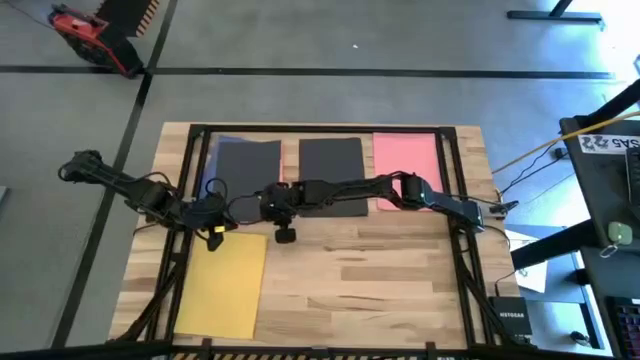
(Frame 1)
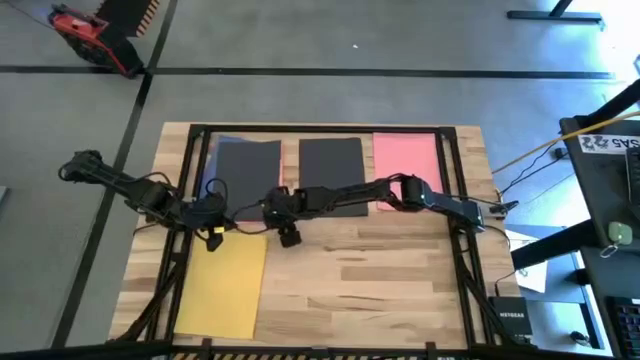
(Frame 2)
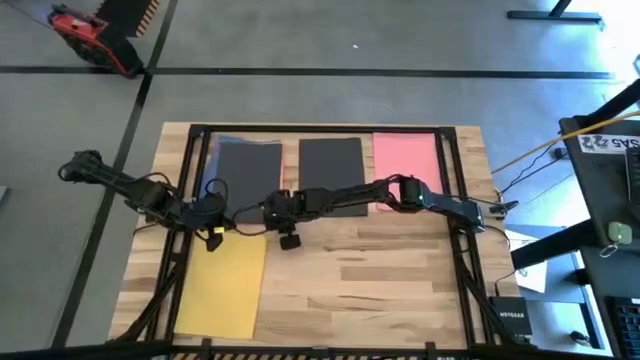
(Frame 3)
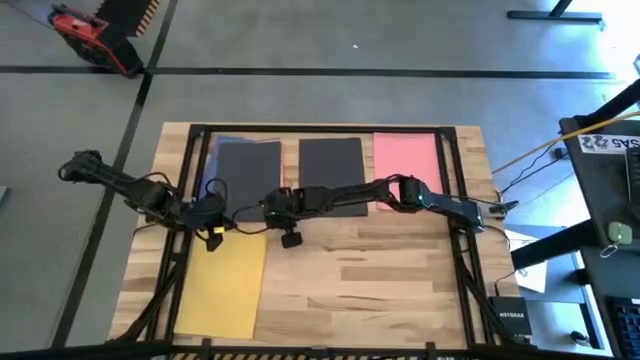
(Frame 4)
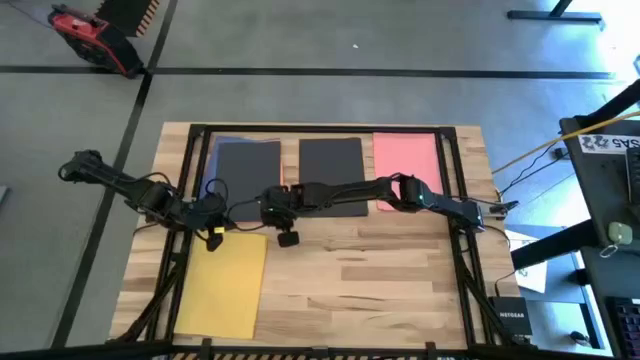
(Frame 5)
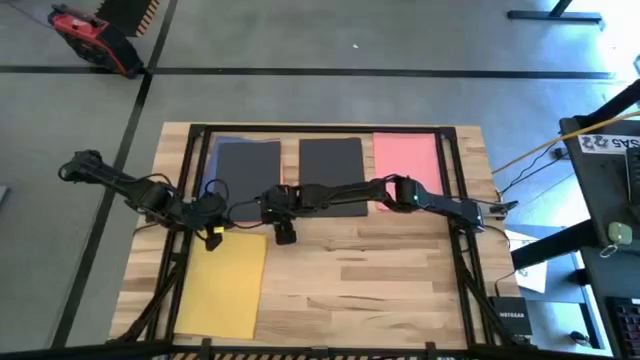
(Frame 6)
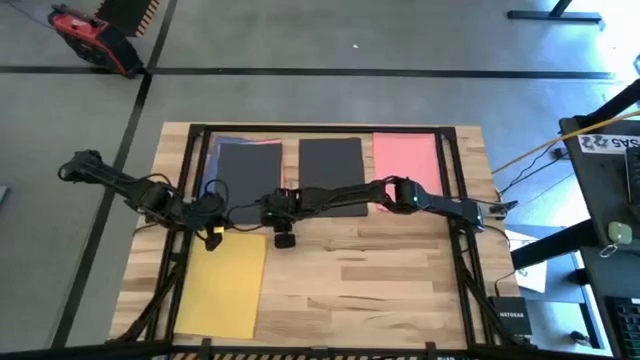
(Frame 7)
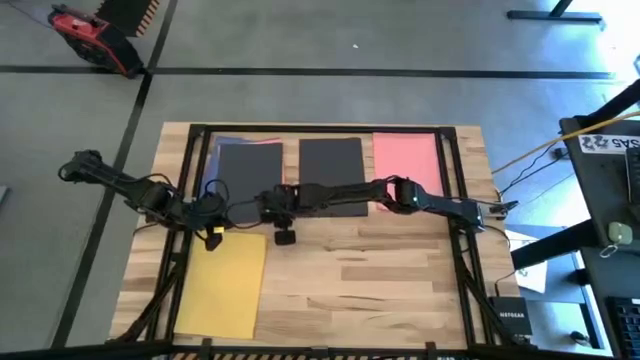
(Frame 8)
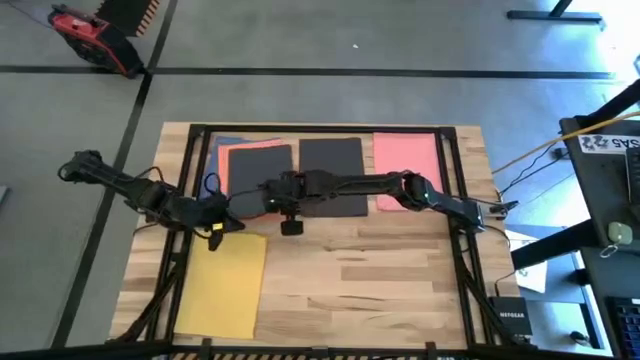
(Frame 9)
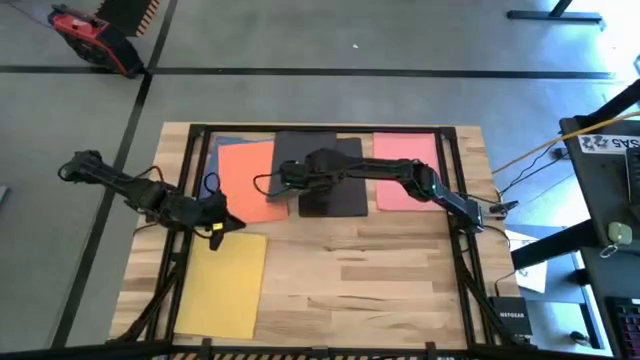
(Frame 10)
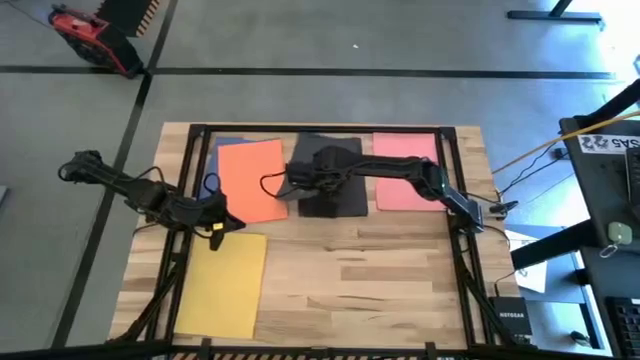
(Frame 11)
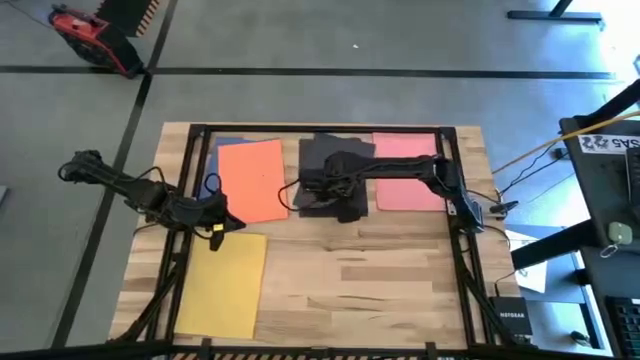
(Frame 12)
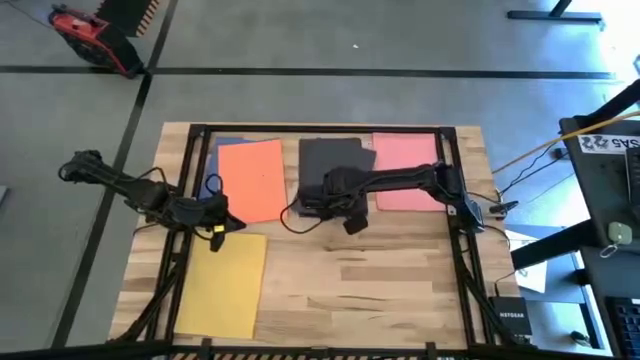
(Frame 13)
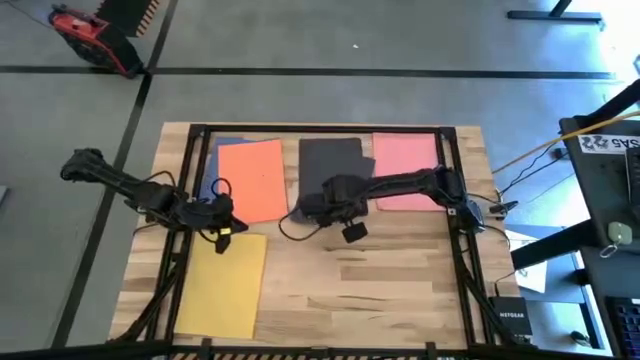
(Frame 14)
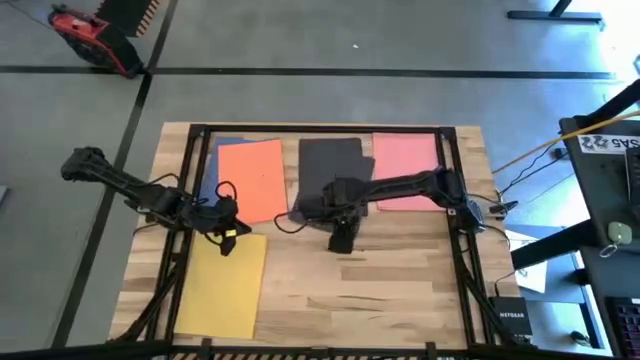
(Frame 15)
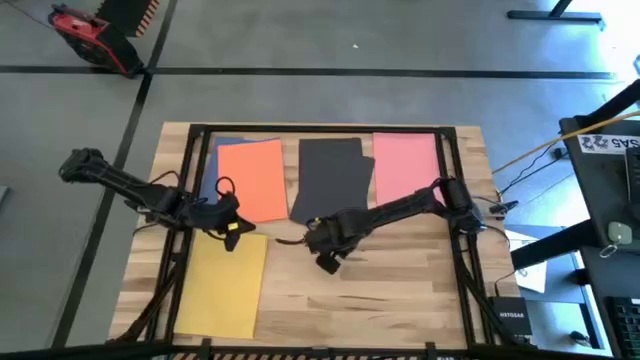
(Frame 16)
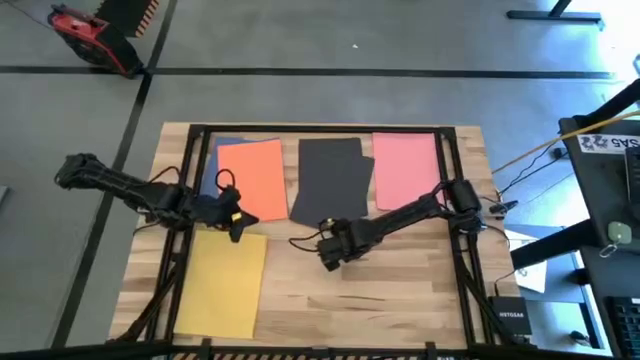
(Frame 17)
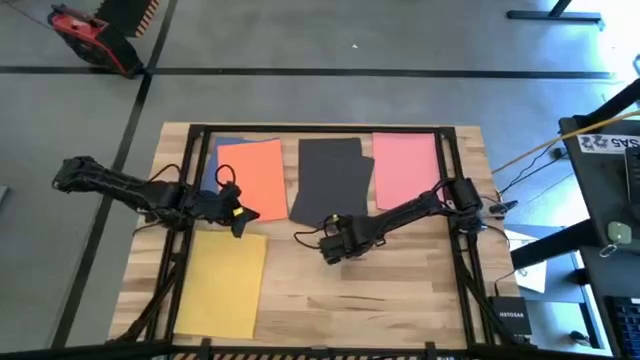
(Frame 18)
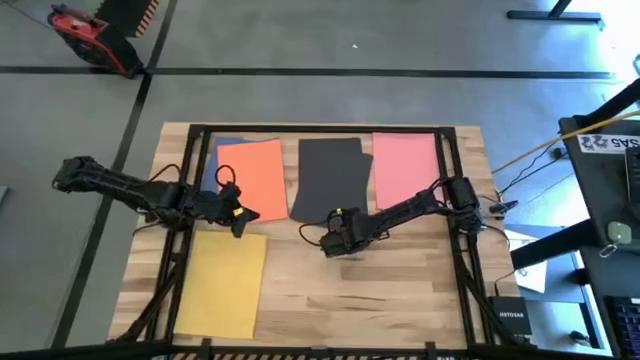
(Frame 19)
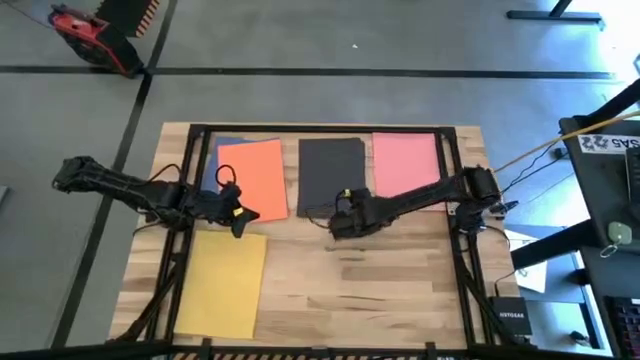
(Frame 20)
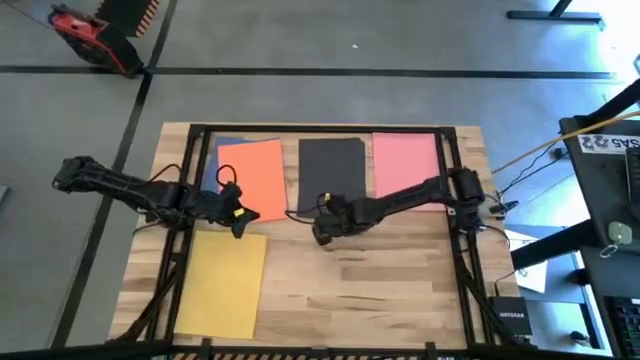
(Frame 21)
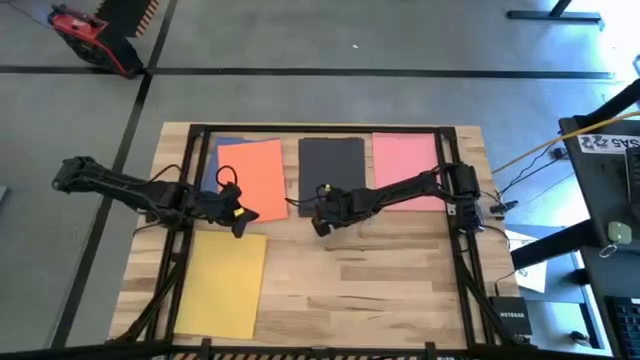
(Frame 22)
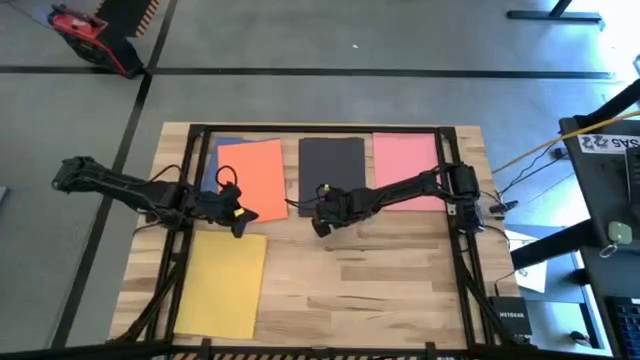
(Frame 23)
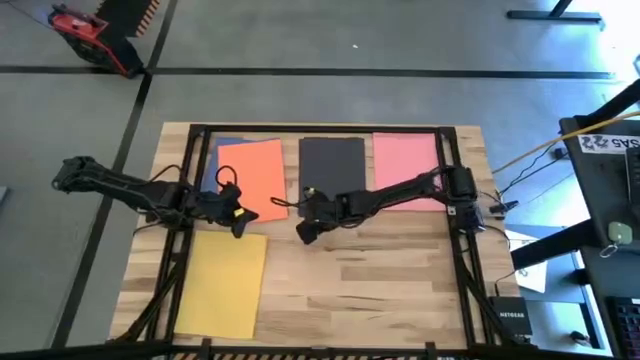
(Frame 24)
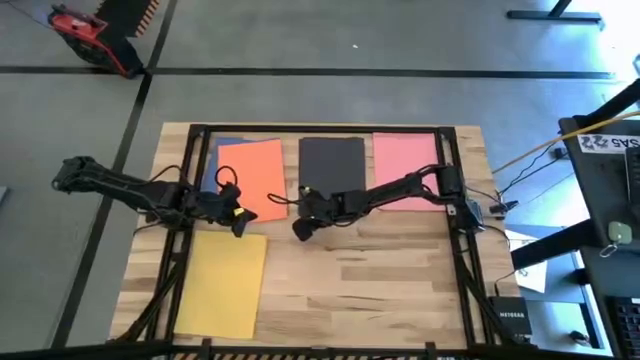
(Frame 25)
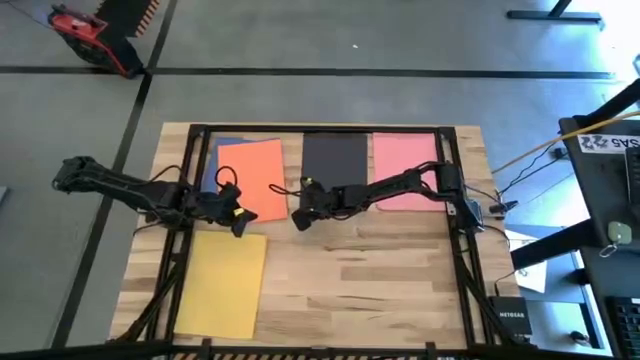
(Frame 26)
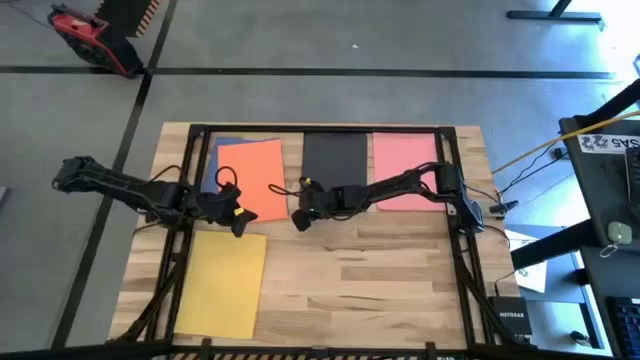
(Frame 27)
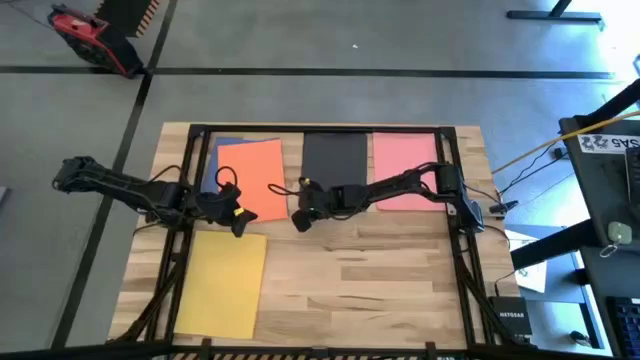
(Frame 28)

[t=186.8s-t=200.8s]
Task: Organize paper
Stack the black paper on top of the stacked black papers

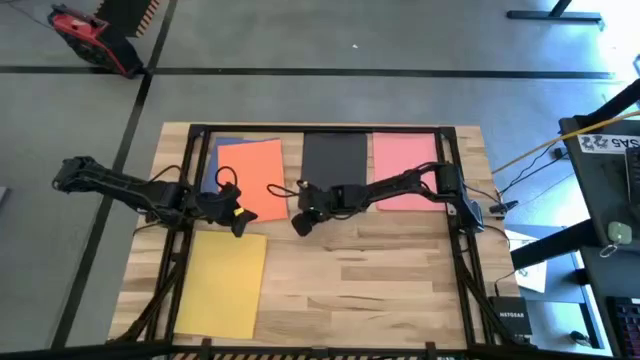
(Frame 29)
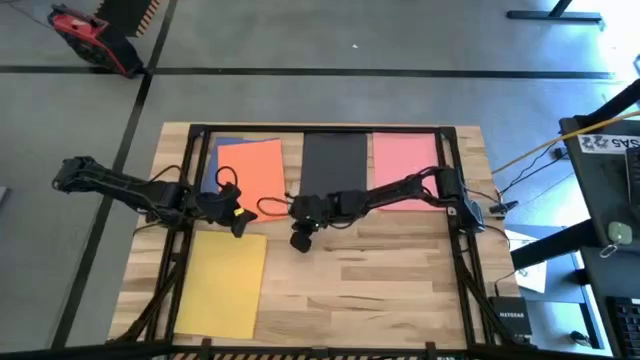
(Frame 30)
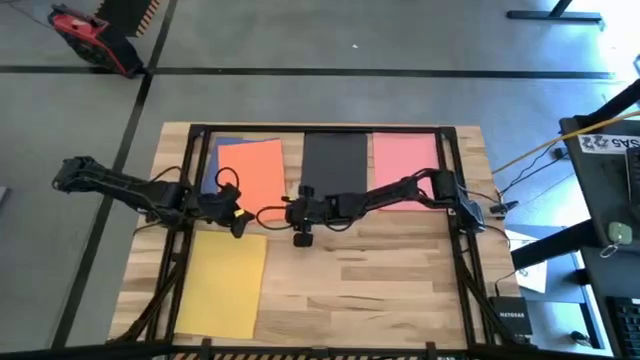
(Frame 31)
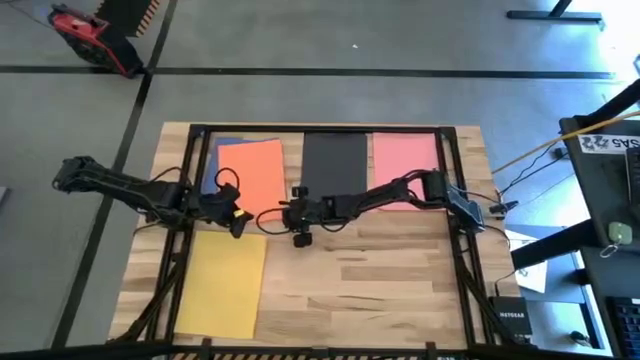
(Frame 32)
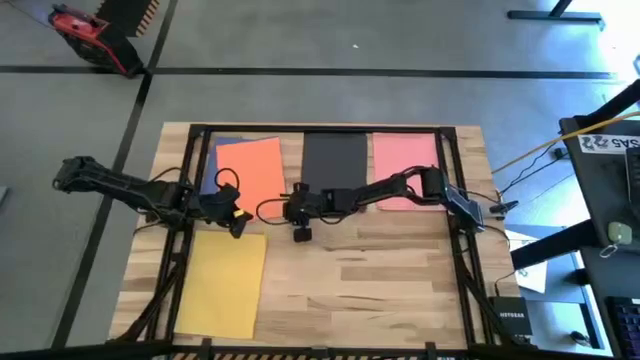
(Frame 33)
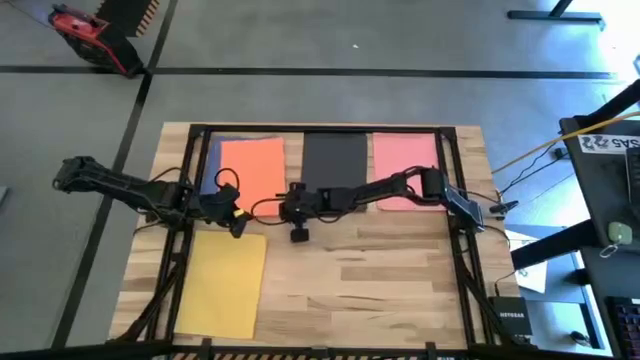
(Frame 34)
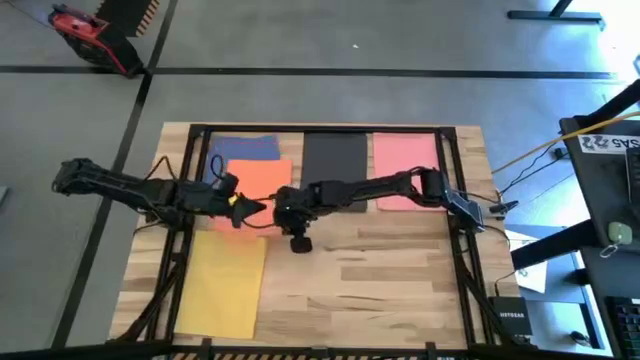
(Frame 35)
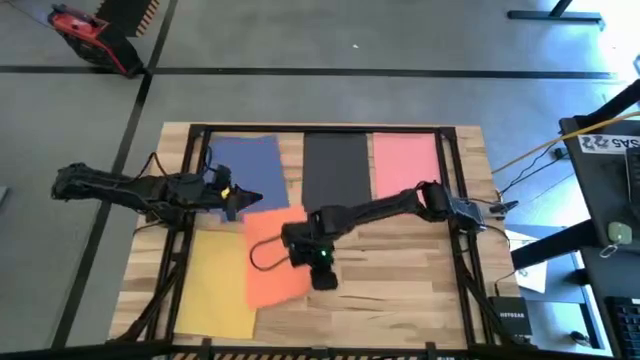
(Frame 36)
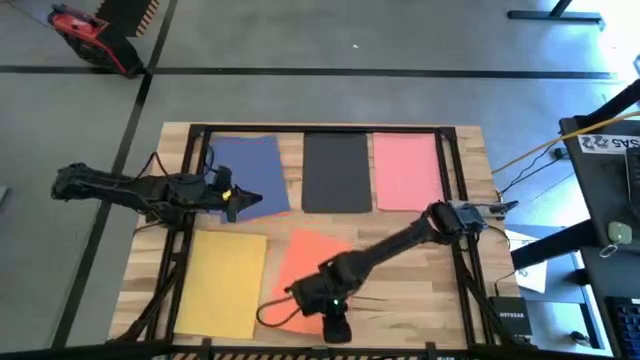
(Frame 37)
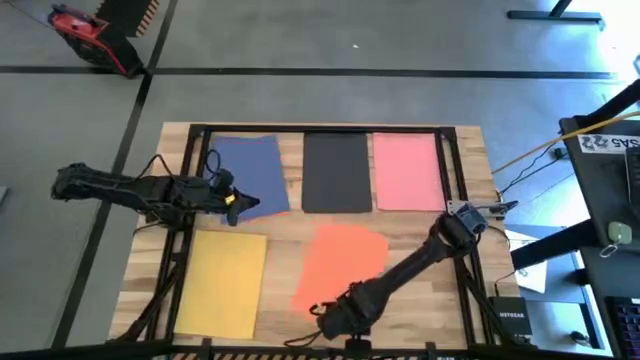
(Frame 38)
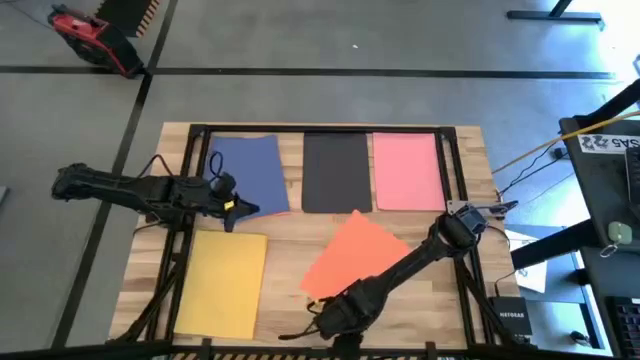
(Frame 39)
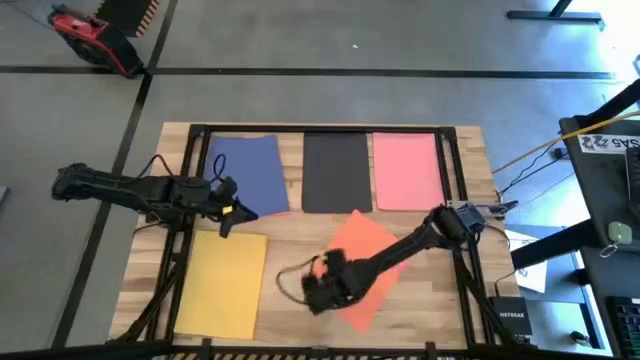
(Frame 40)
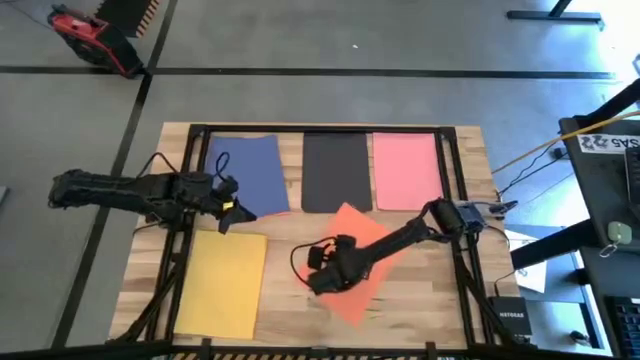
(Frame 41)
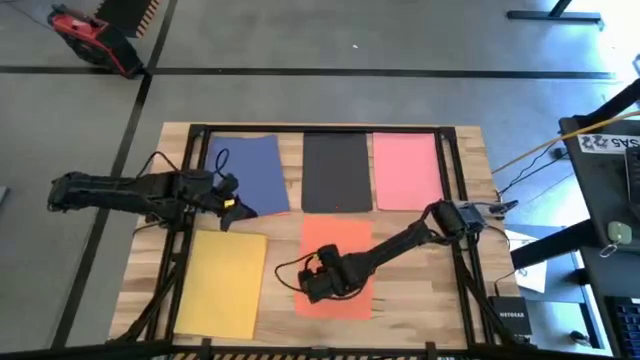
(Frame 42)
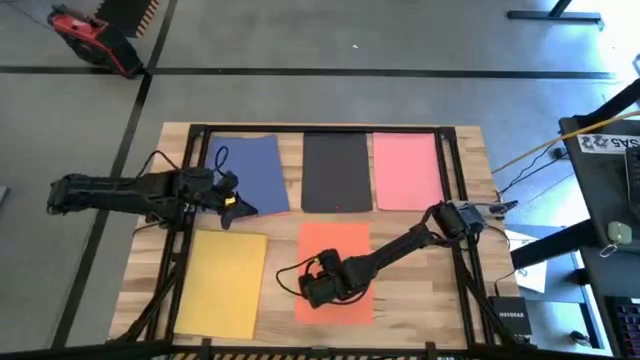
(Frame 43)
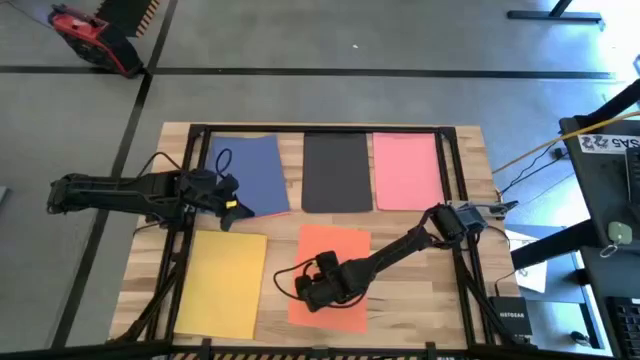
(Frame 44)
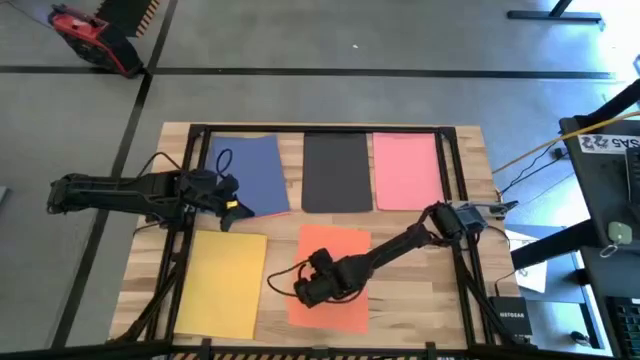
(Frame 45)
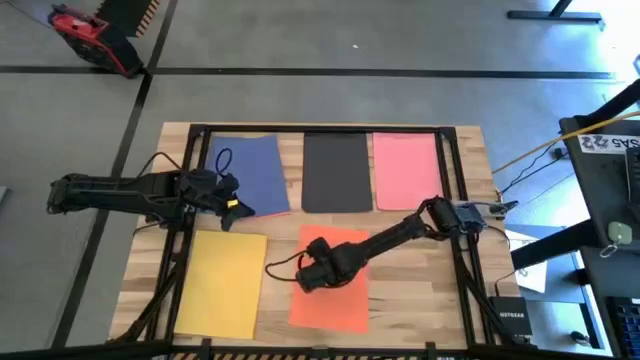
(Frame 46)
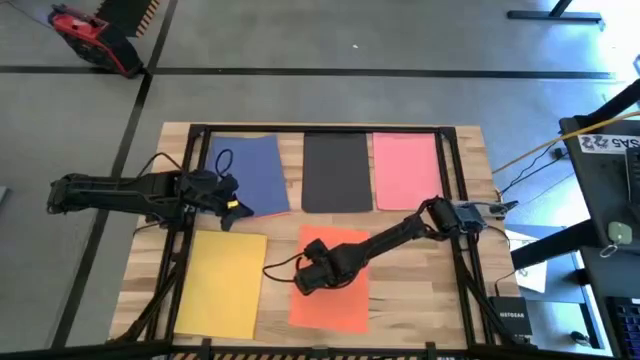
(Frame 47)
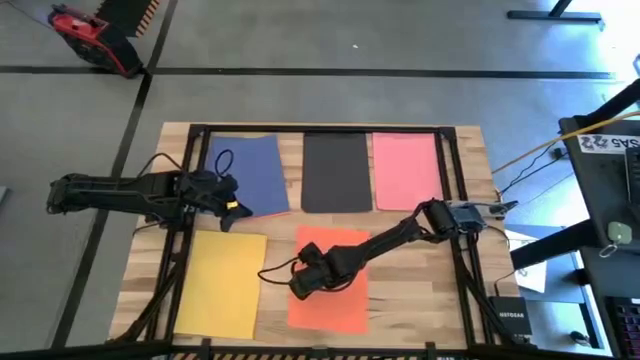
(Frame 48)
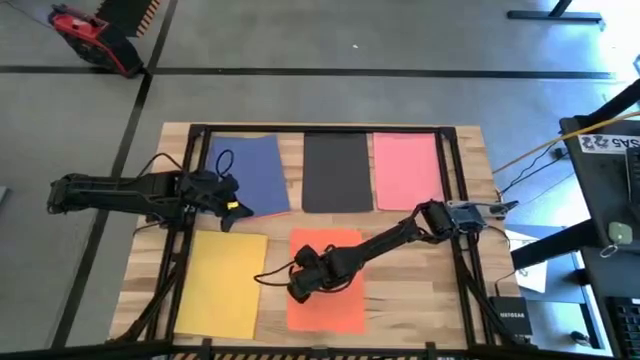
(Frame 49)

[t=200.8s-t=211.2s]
Move the orange paper to the bottom center of the table
